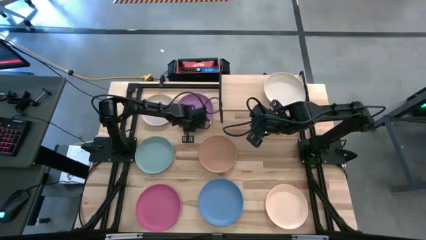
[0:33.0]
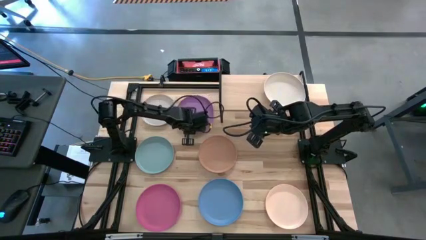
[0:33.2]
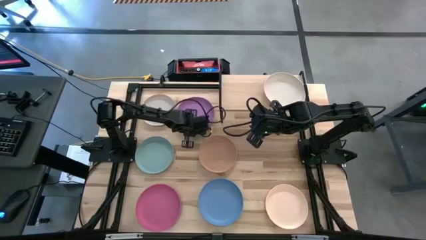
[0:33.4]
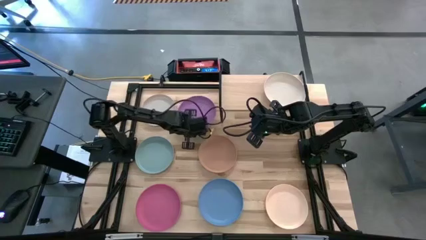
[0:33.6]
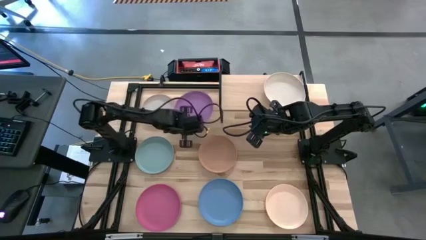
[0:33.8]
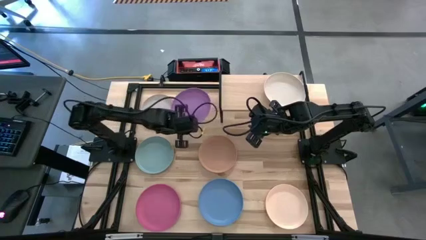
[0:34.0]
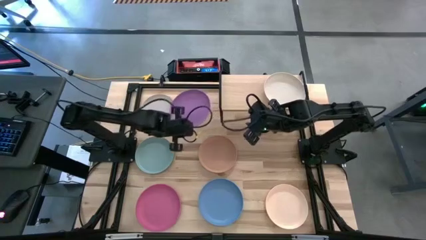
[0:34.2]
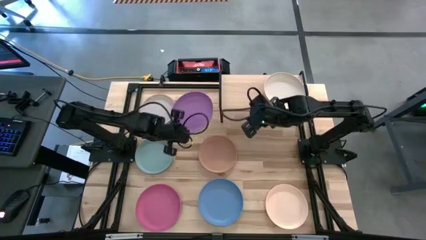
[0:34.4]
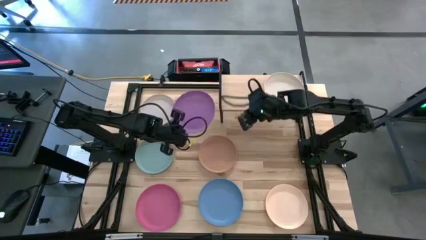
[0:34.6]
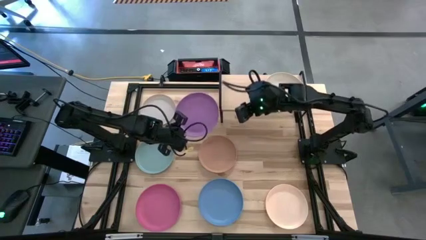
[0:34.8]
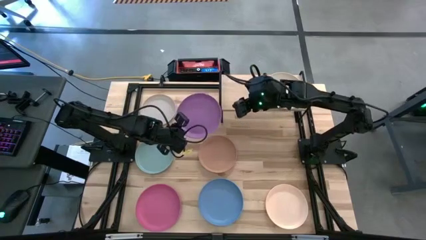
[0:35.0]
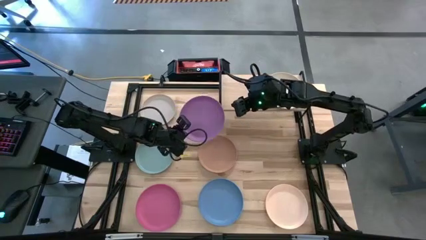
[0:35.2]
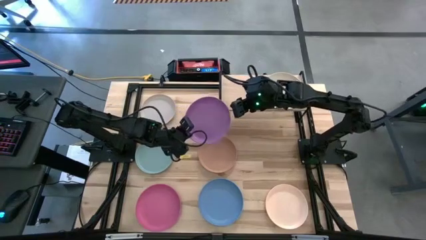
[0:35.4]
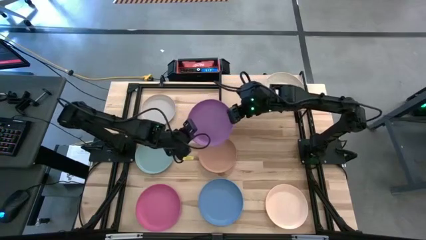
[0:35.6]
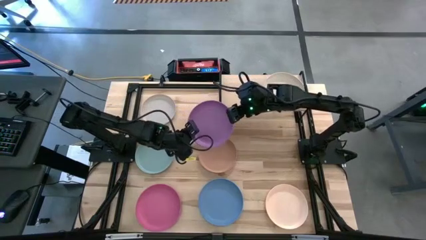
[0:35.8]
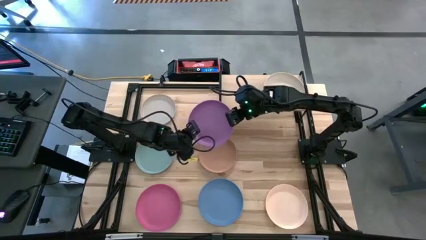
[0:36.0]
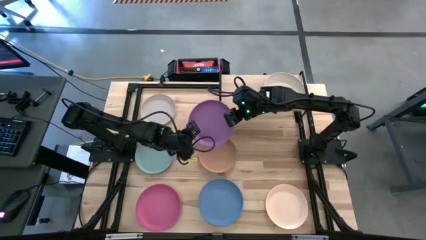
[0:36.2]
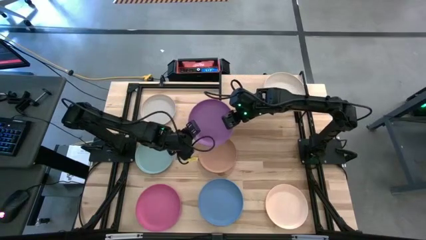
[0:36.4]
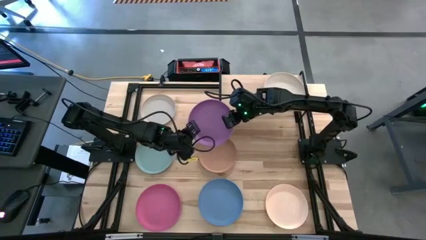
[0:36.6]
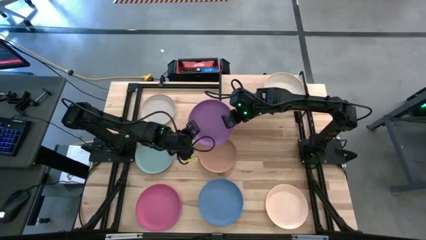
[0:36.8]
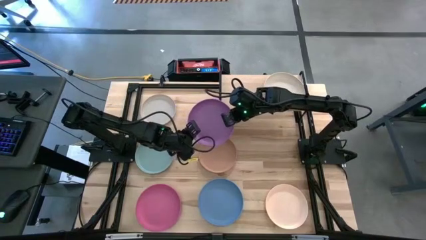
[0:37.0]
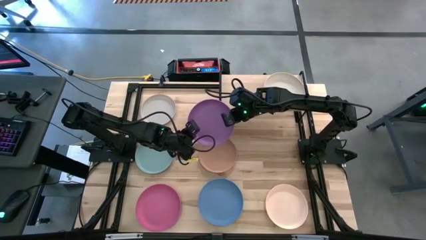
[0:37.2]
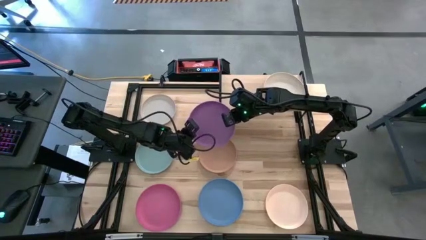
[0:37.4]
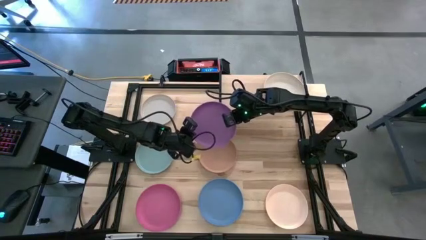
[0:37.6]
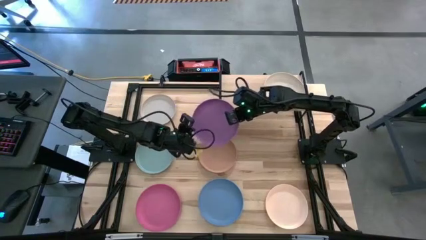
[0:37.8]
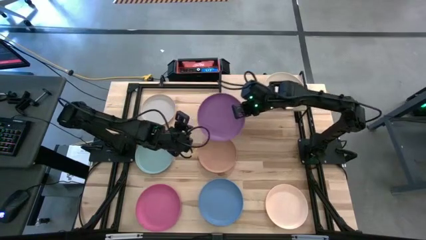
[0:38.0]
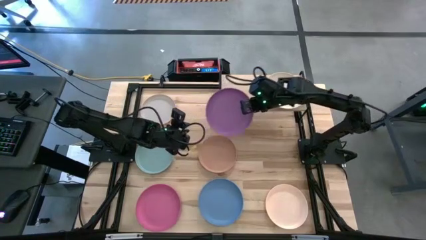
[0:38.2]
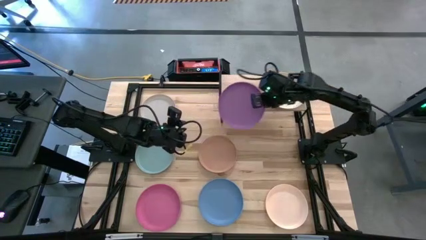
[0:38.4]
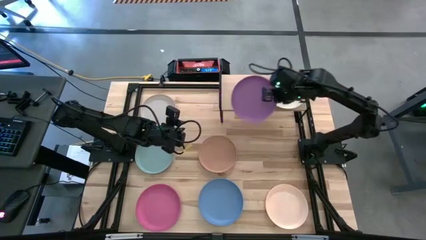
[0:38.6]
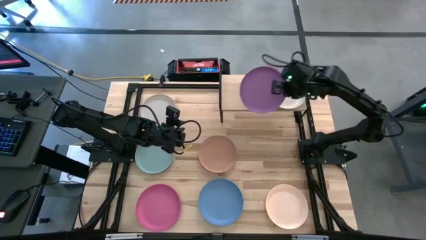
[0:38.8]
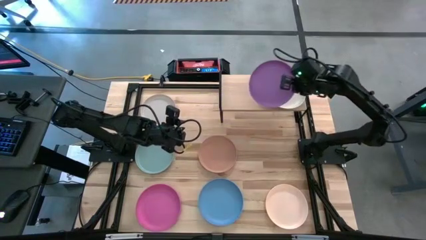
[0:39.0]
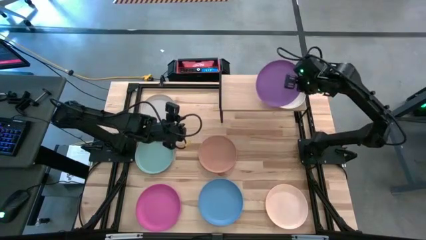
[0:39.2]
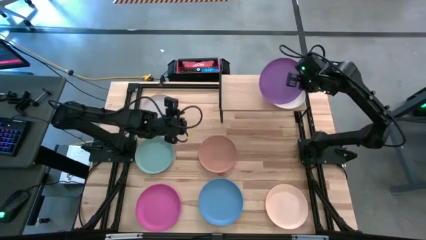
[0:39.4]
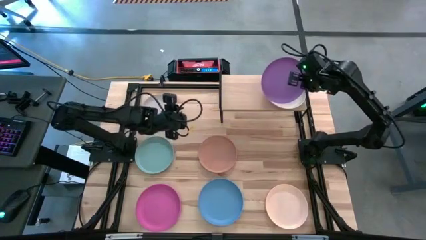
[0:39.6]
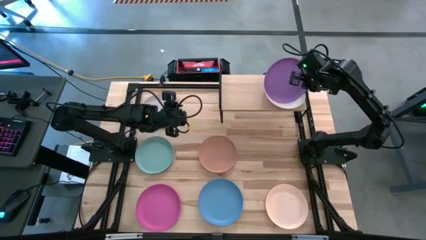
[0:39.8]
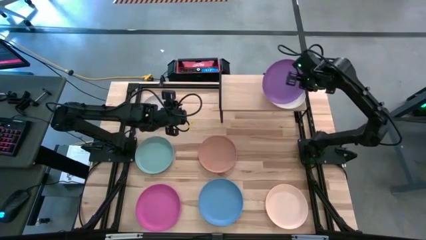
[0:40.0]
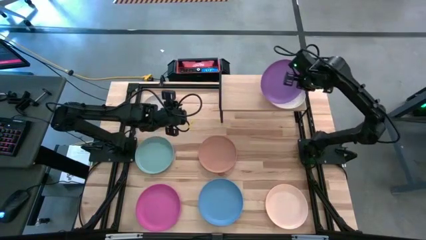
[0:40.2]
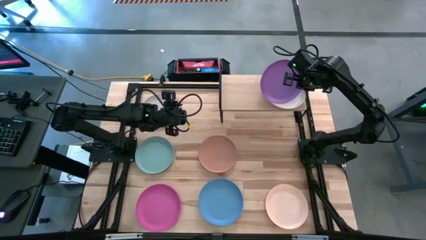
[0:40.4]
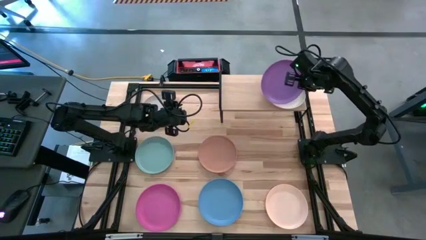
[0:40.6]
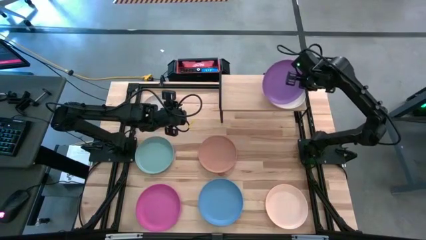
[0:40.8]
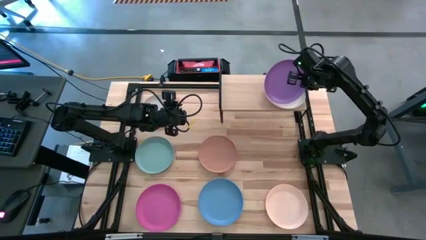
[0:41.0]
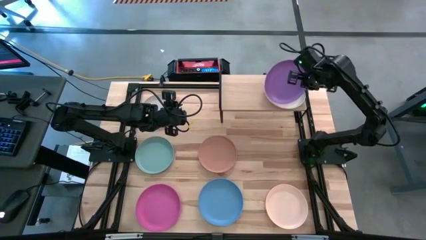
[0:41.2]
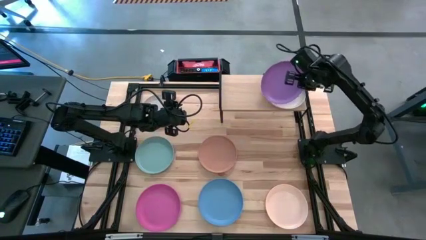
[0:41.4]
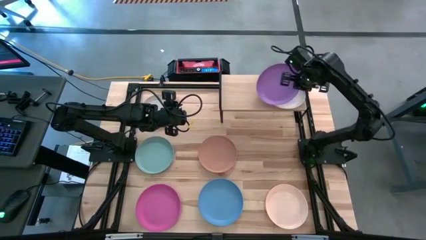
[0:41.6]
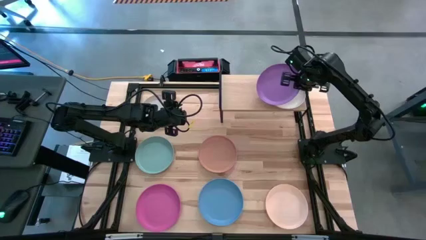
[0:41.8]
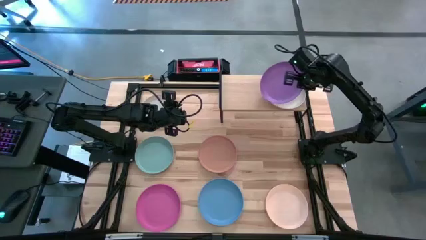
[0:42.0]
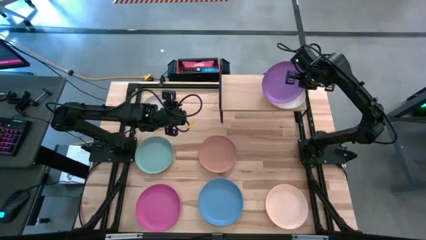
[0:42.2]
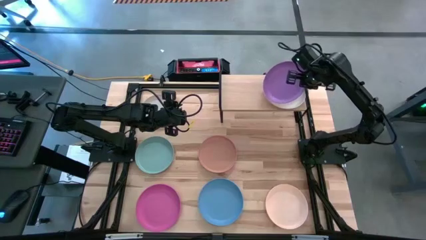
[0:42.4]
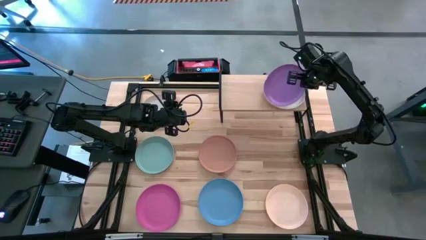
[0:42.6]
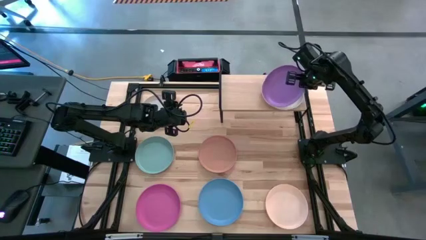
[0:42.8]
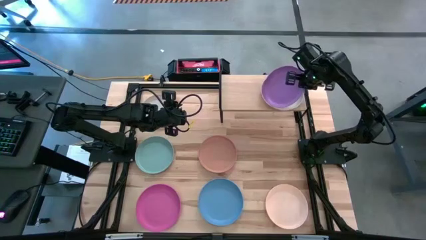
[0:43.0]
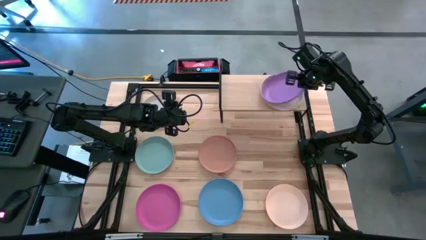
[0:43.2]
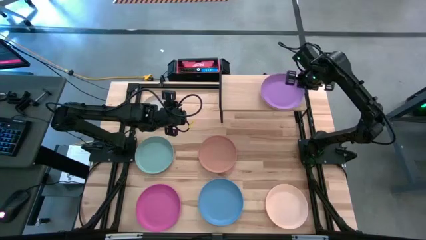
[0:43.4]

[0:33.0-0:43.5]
Task: Place and stack plates onto a shelf
Stack the purple plate on top of the white plate on the shelf

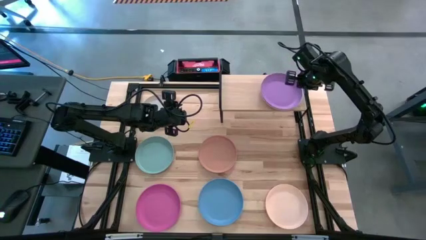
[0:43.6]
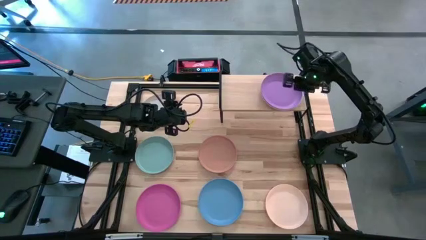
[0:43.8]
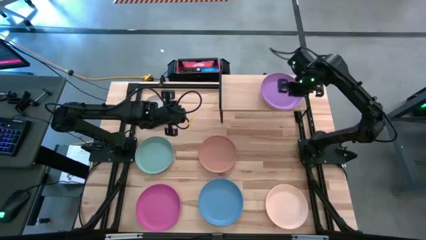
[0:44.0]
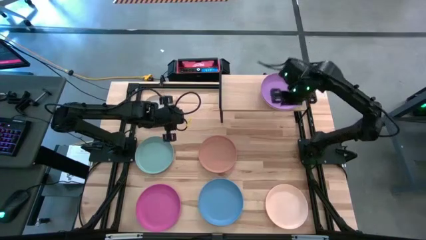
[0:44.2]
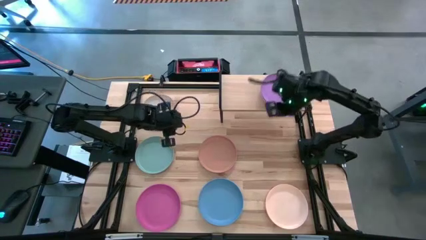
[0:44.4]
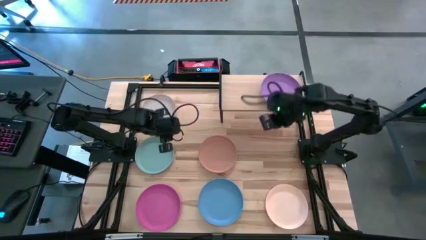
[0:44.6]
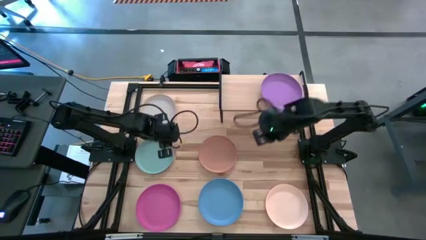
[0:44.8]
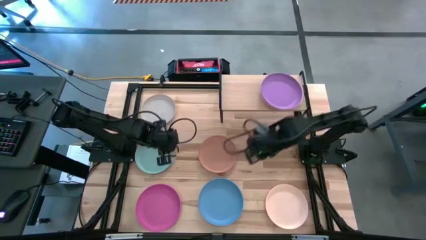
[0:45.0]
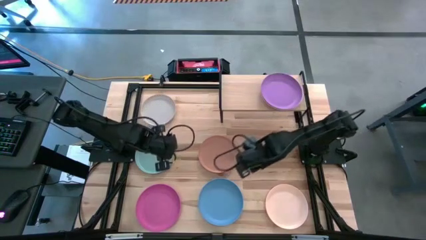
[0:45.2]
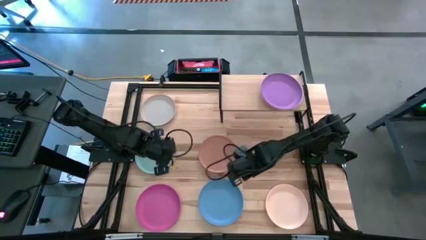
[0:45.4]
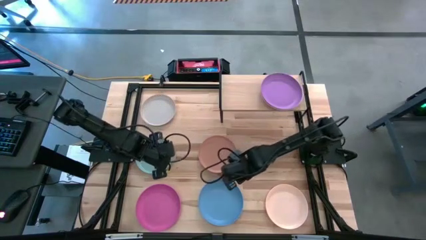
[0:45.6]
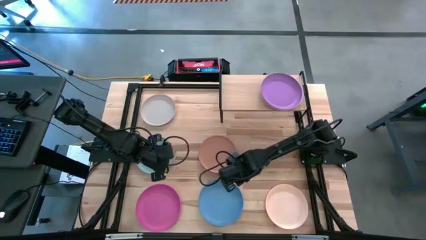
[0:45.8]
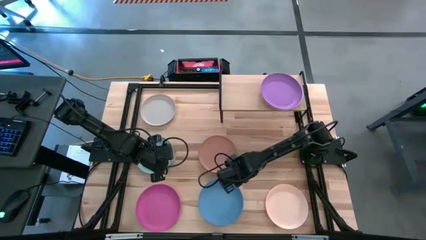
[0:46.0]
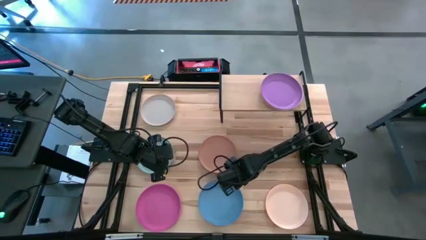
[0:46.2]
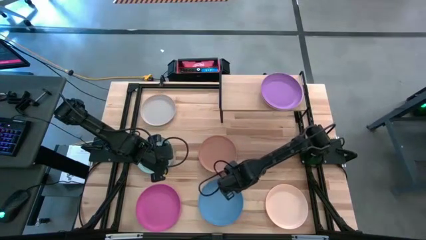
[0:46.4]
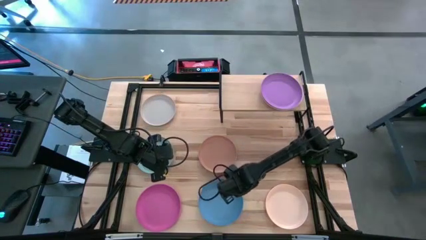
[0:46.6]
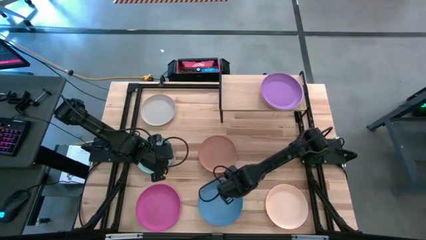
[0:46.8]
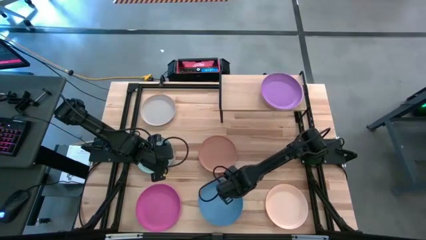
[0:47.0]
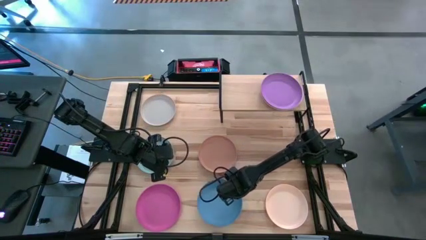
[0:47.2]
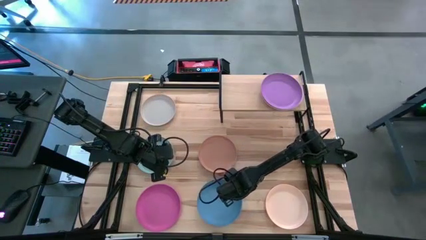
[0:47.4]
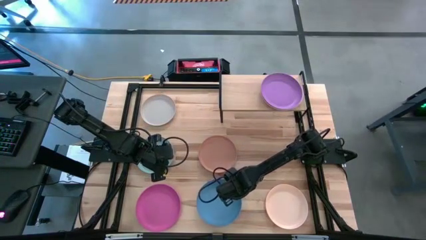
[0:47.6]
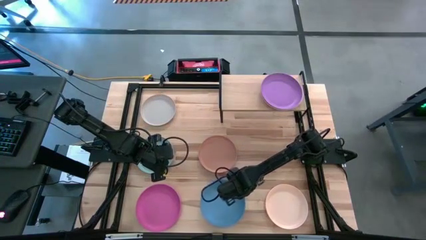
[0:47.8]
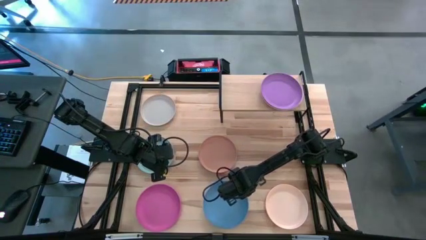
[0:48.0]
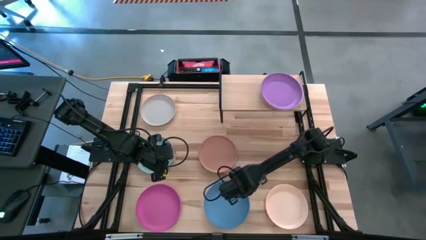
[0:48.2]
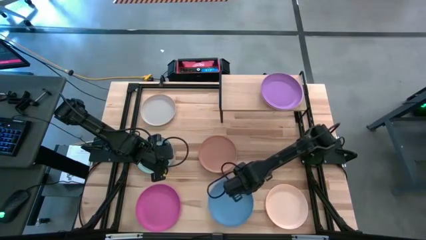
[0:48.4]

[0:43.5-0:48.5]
Stack the blue plate on top of the purple plate on the shelf

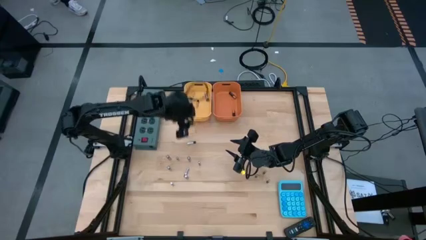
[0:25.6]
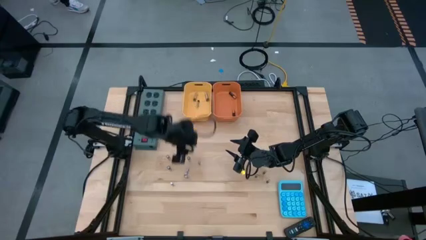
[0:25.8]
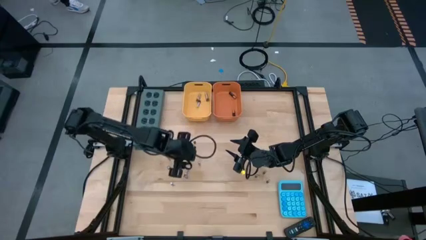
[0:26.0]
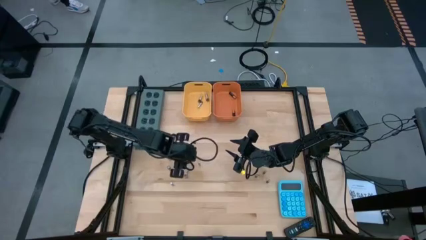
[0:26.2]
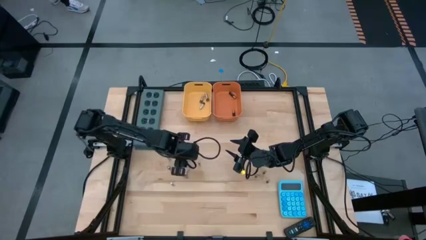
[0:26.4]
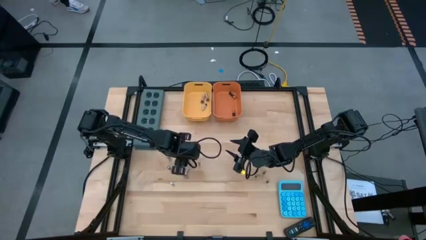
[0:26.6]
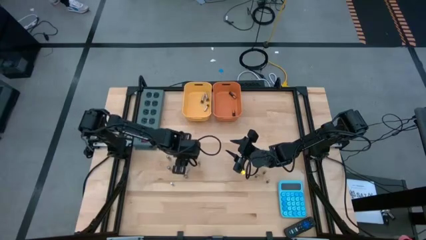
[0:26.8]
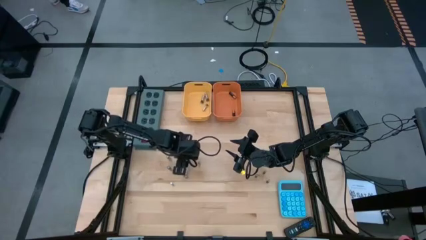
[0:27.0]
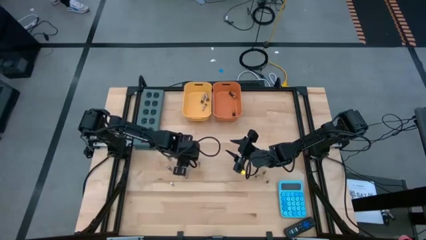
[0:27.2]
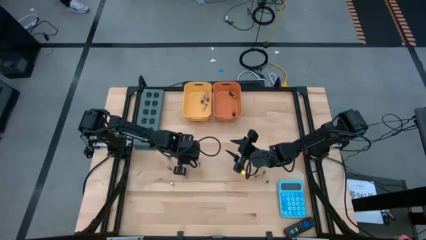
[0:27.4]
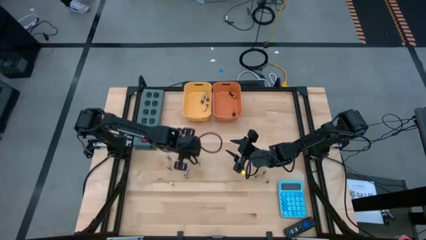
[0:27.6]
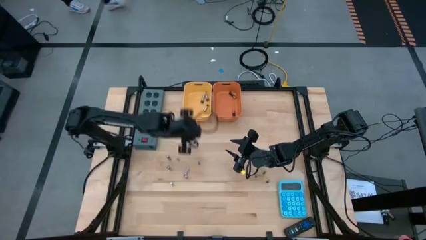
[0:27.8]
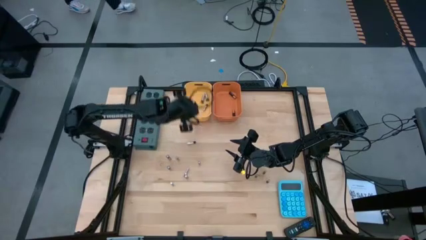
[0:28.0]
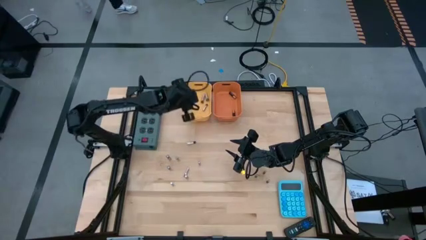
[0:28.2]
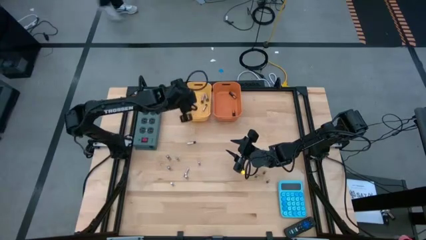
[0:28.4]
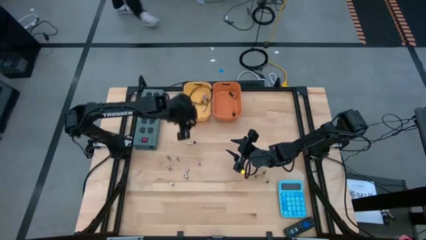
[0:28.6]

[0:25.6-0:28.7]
Task: Sort batteries
Put the silver battery into the yellow bin
